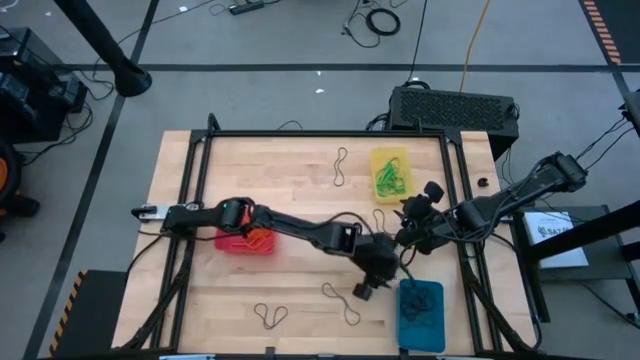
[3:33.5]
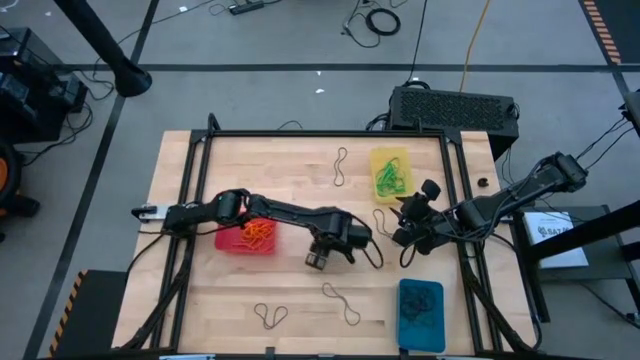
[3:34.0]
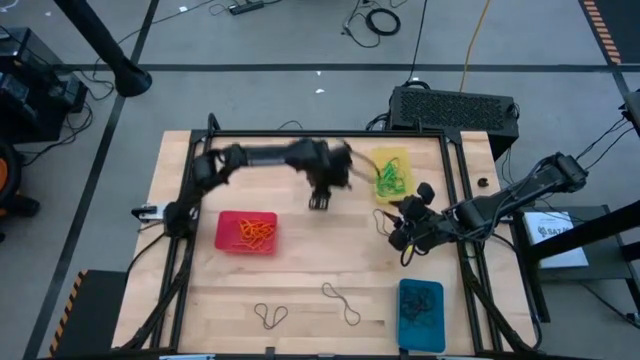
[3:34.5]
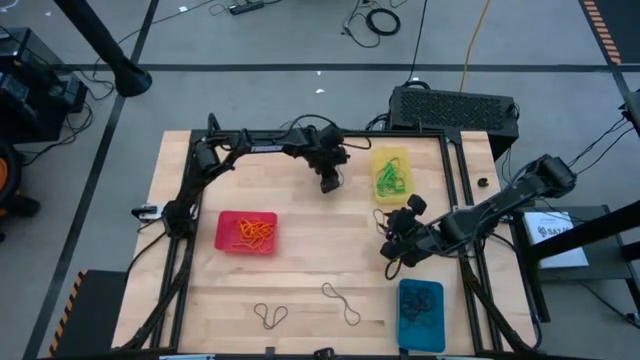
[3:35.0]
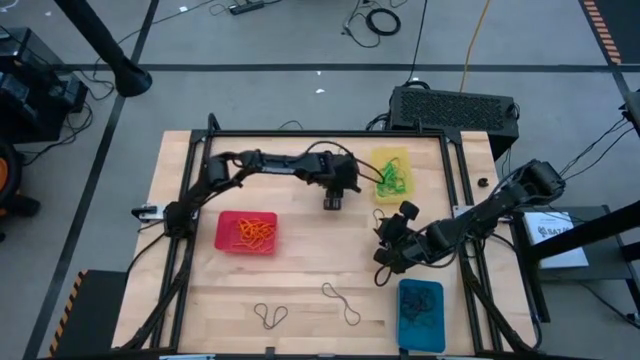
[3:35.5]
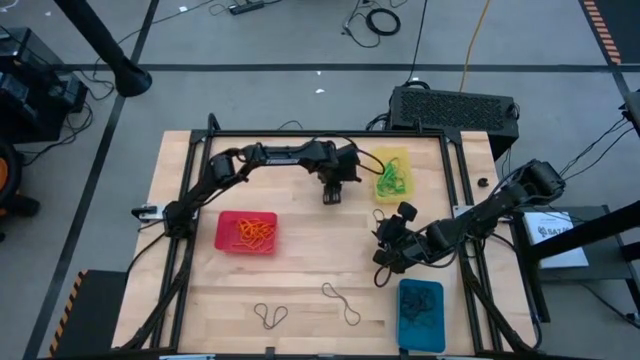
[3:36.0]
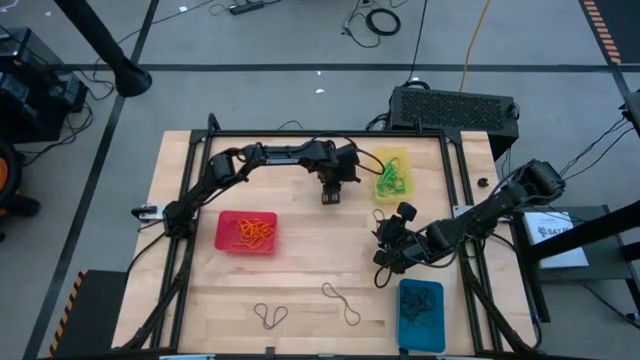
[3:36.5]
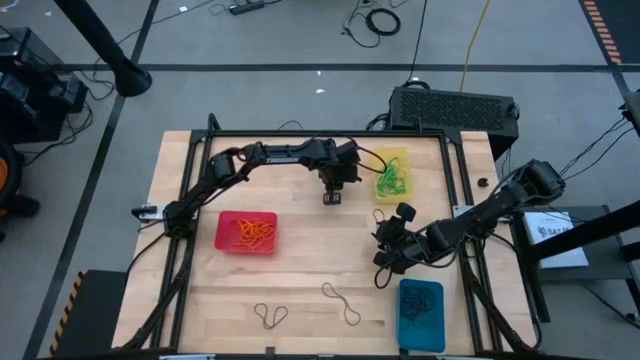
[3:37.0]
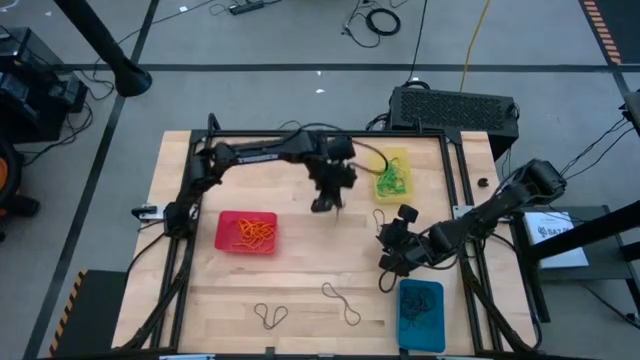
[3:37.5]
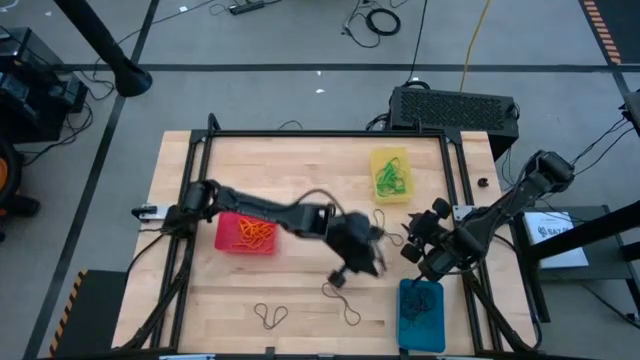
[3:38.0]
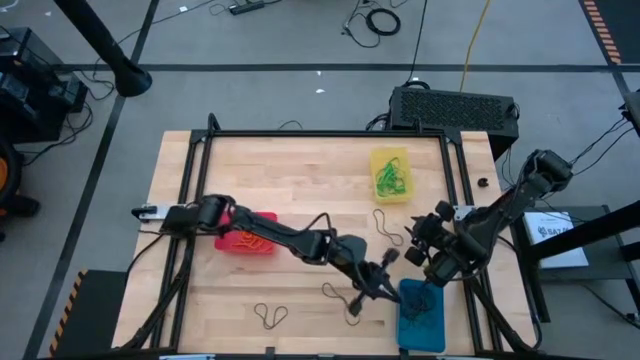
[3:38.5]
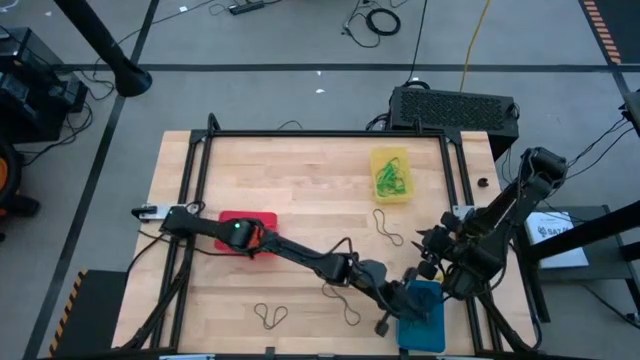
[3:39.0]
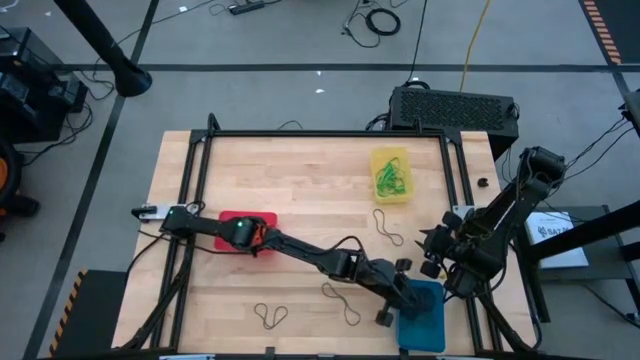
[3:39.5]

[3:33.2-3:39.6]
Task: Sort rubber bands into baskets
Put the violet rubber band into the blue bin

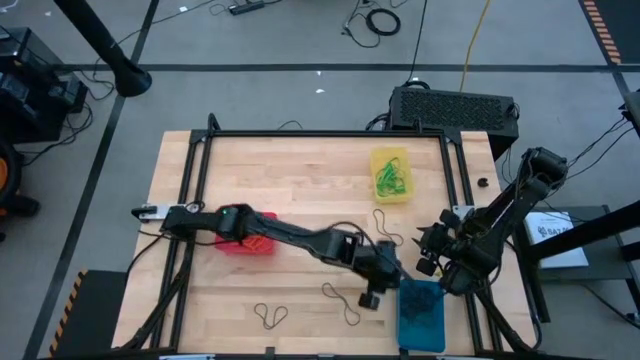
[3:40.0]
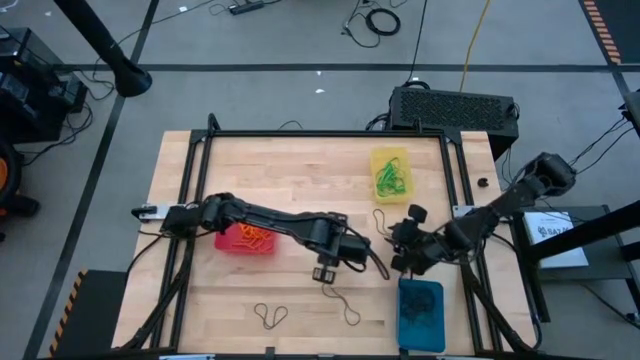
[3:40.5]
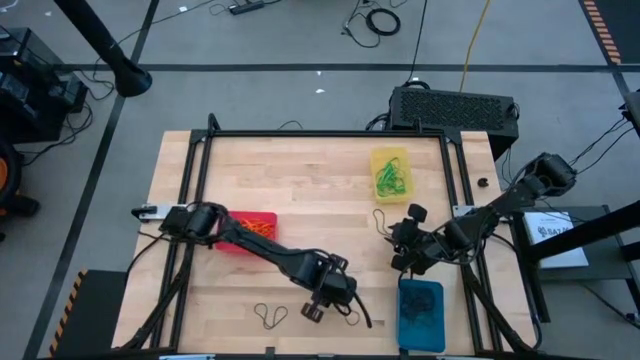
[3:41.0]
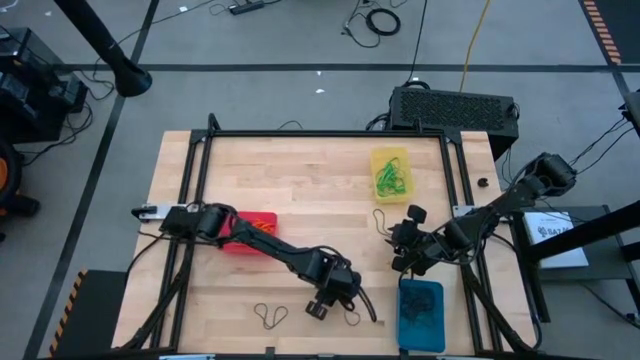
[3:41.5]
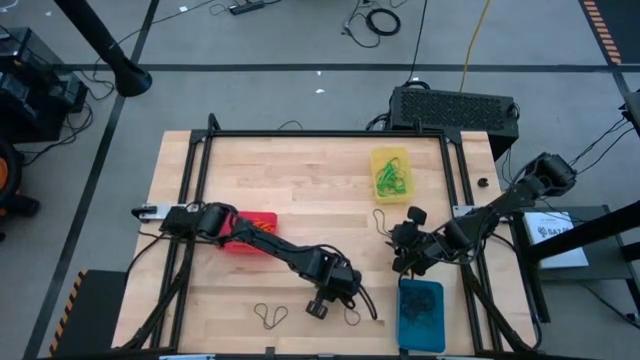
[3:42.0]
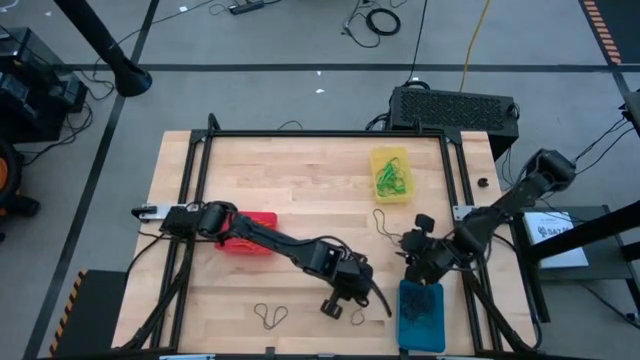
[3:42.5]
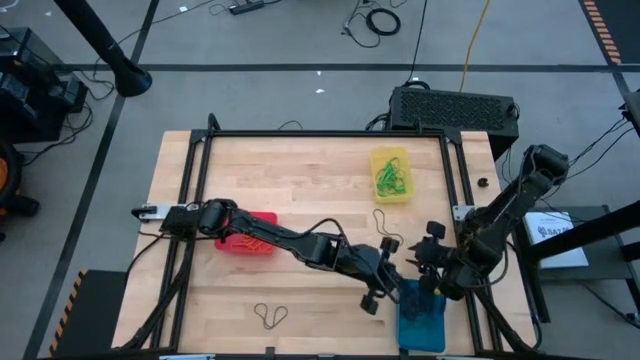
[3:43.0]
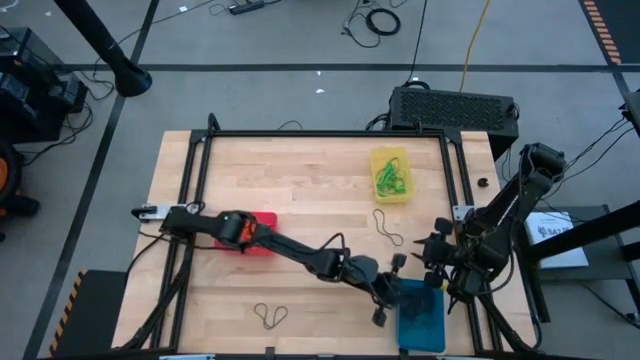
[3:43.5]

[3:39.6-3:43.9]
Put the violet rubber band into the blue bin

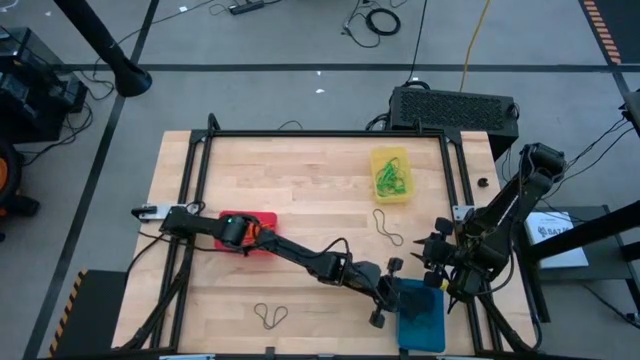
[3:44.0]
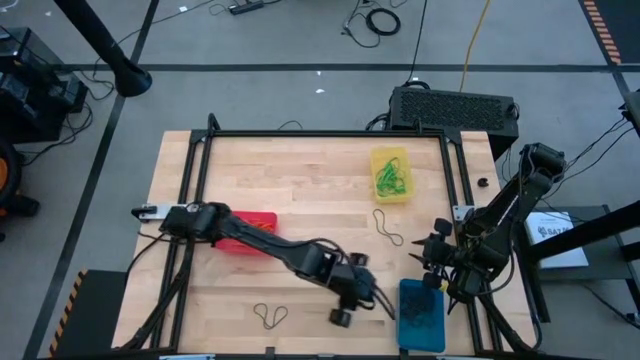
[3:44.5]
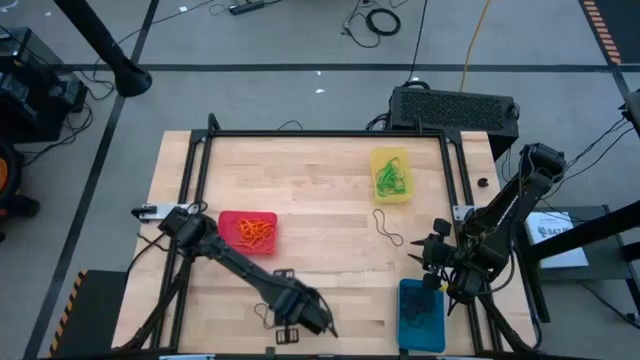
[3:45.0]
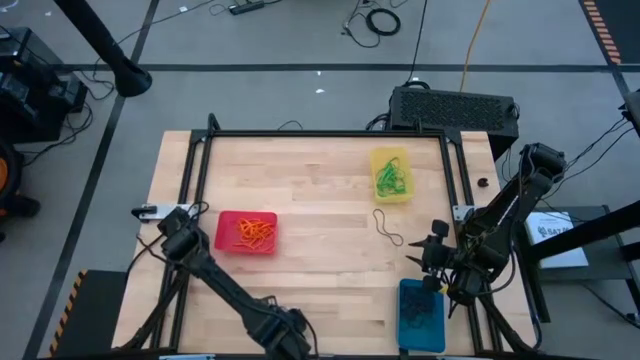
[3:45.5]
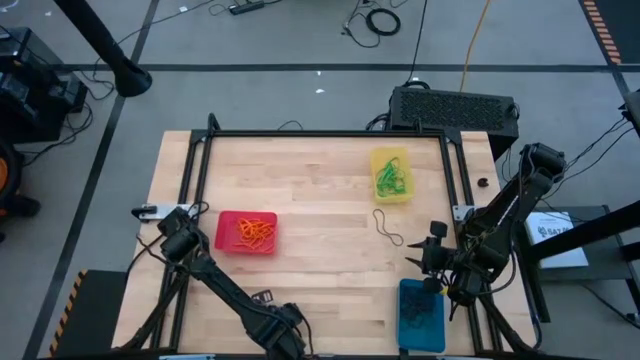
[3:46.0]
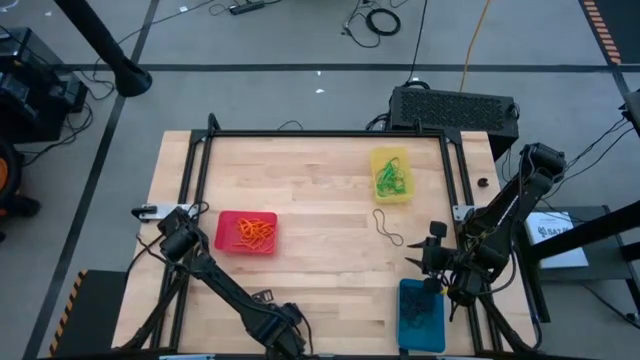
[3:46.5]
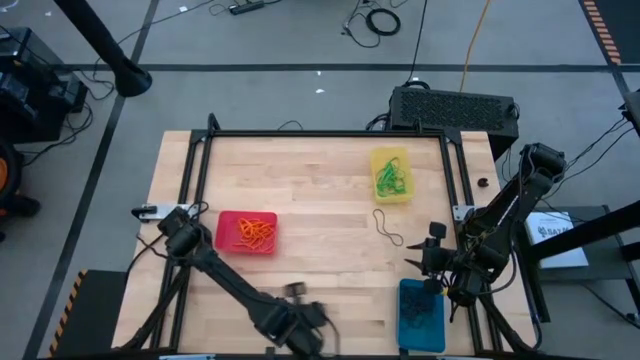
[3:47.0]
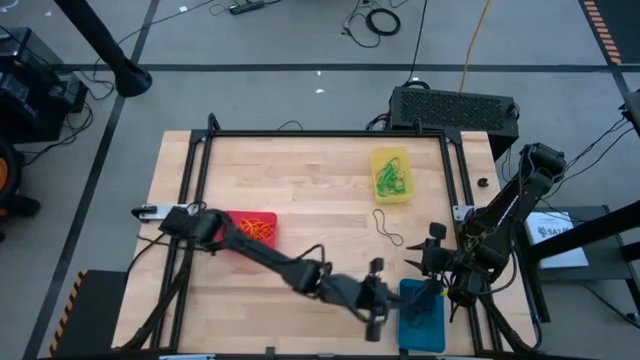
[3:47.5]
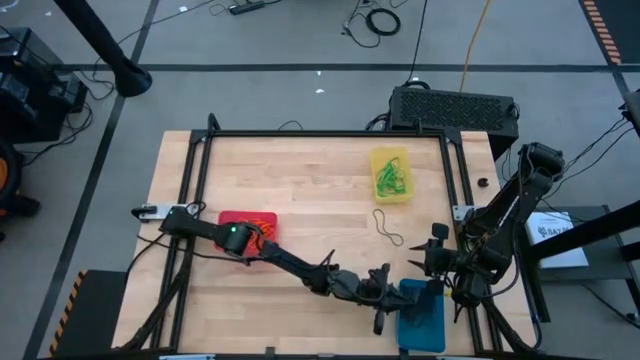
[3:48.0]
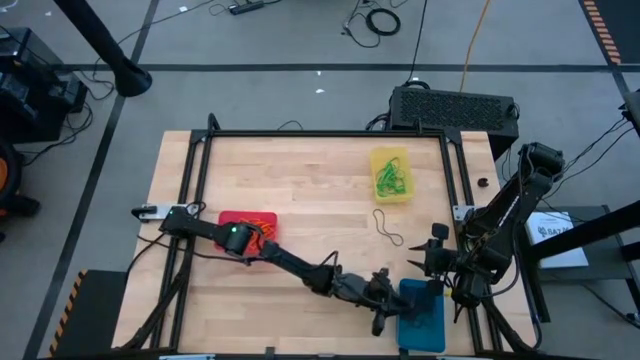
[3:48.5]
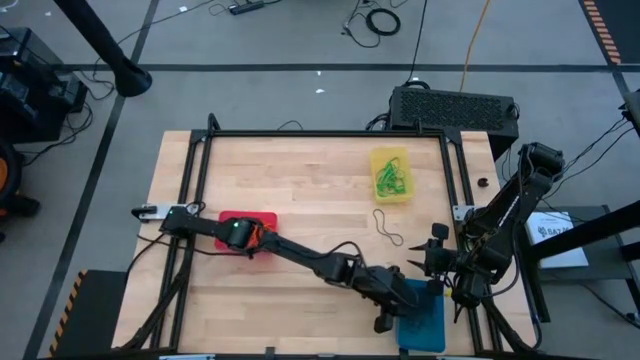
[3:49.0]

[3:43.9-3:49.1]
Put the violet rubber band into the blue bin

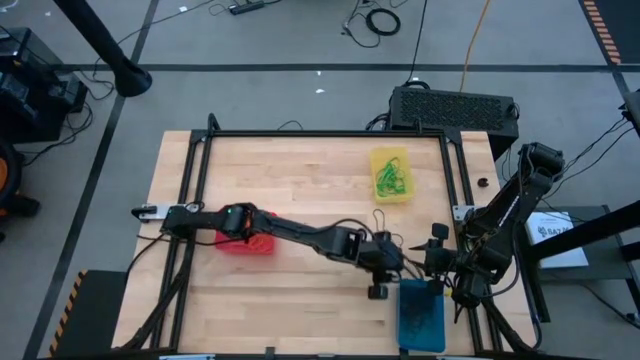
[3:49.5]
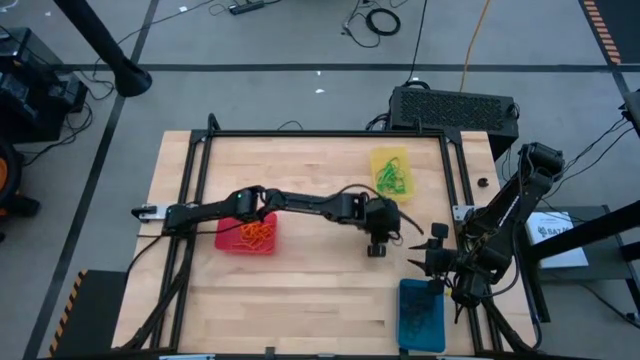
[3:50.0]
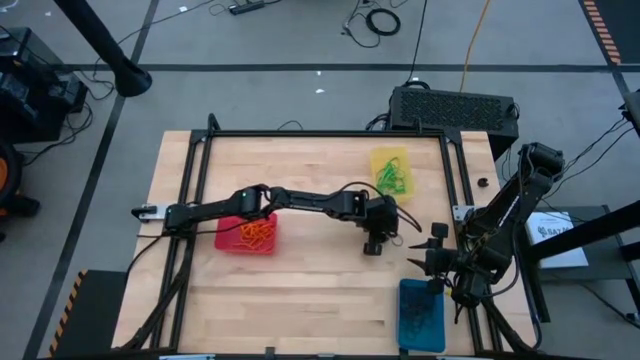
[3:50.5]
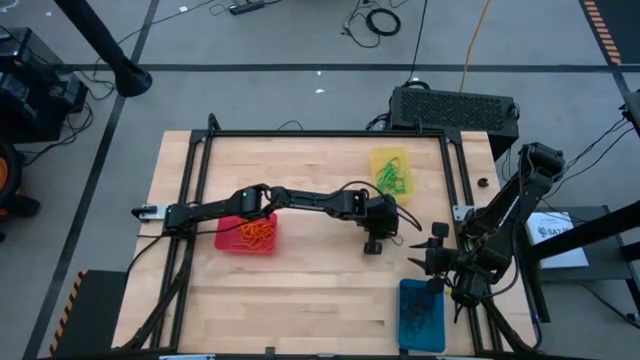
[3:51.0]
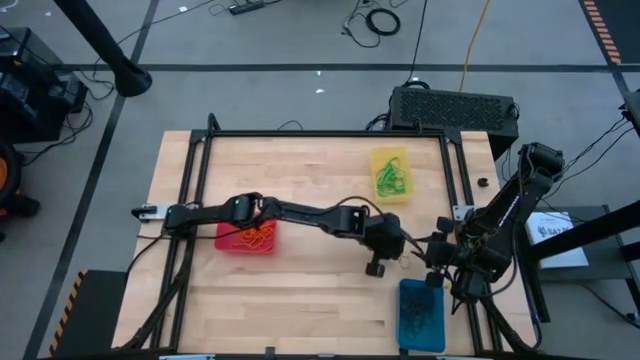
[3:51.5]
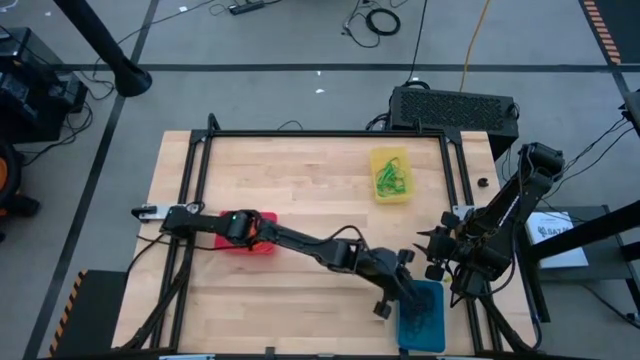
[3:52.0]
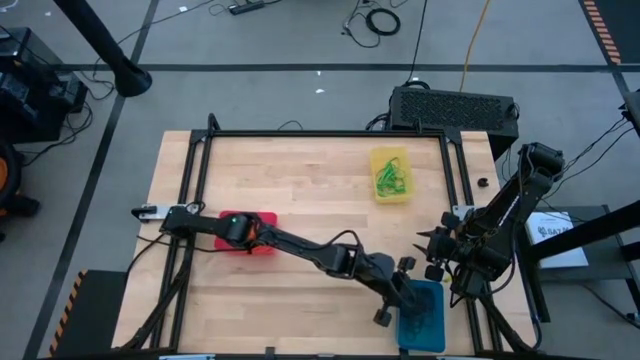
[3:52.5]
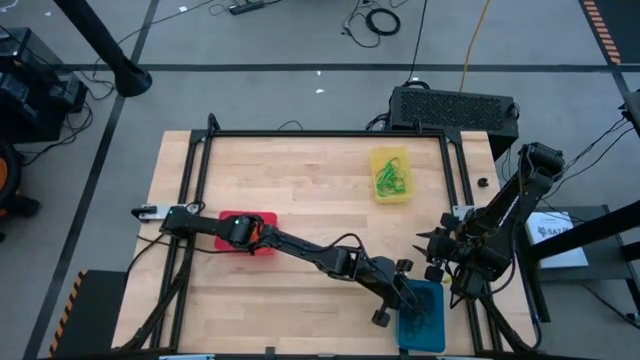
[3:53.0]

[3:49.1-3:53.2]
Put the violet rubber band into the blue bin
